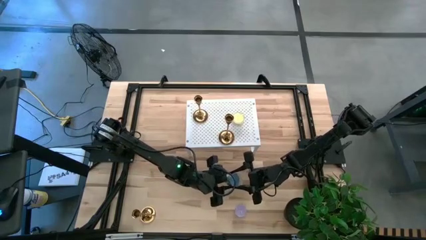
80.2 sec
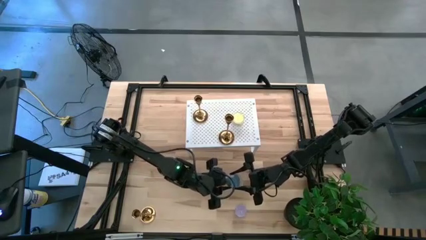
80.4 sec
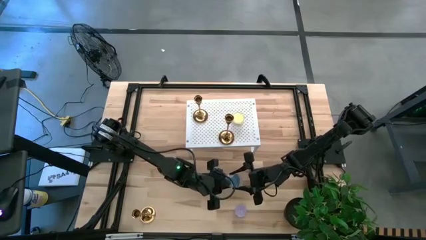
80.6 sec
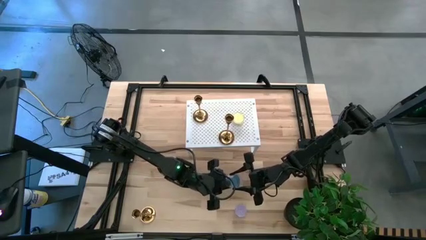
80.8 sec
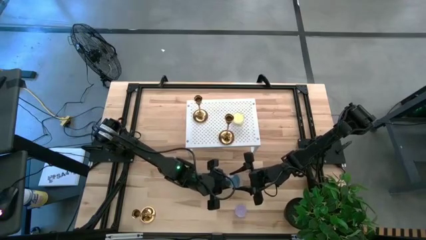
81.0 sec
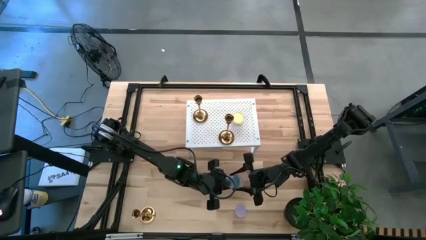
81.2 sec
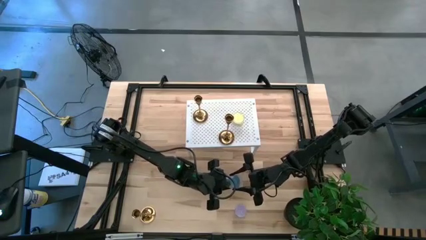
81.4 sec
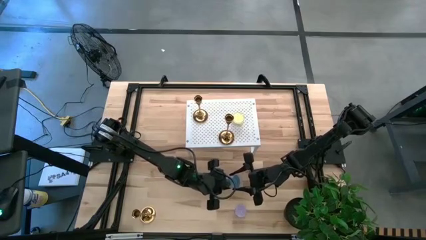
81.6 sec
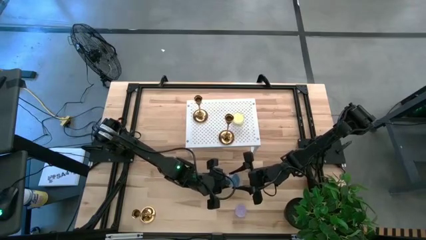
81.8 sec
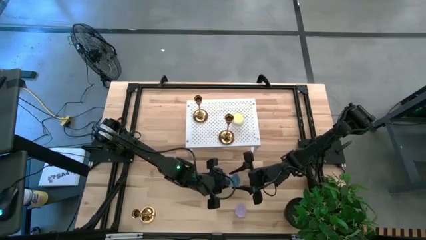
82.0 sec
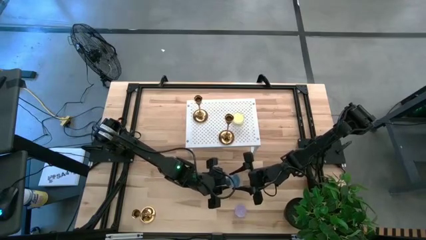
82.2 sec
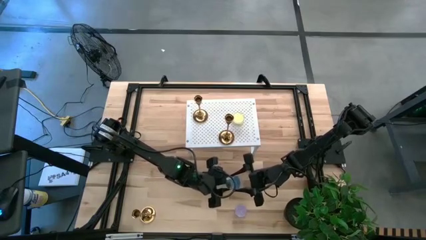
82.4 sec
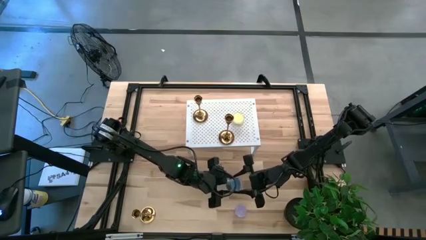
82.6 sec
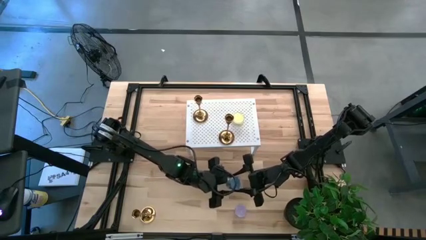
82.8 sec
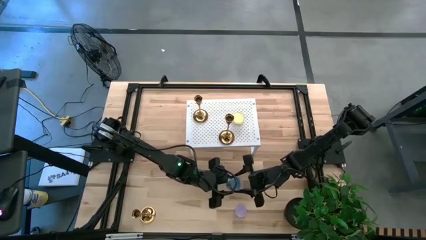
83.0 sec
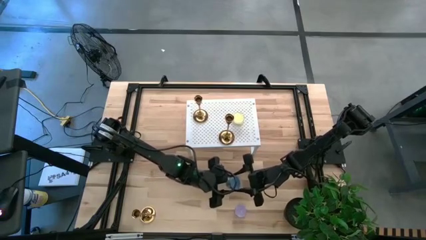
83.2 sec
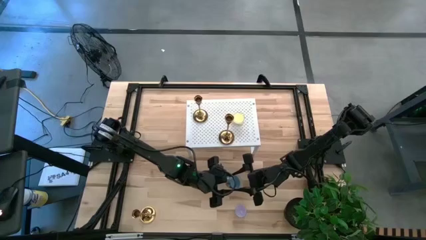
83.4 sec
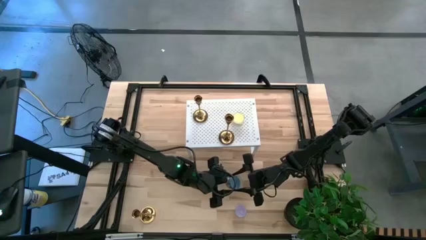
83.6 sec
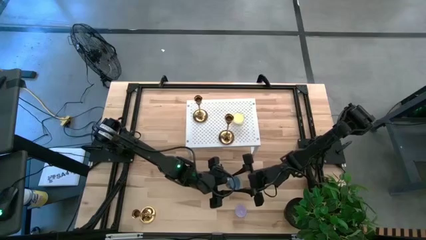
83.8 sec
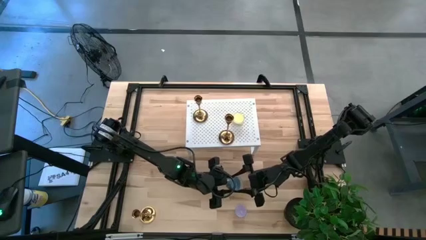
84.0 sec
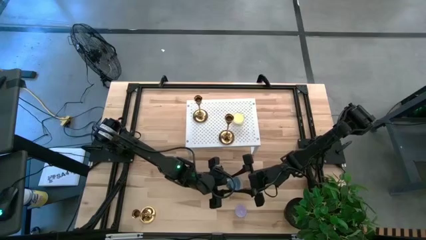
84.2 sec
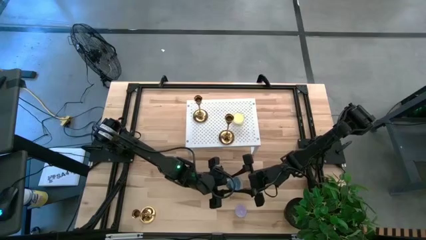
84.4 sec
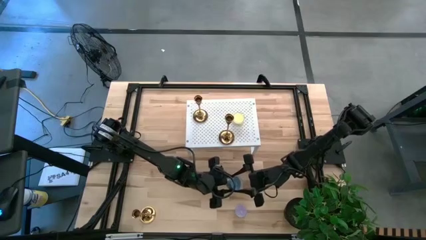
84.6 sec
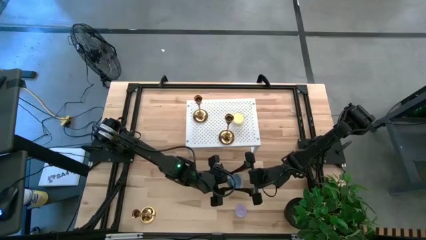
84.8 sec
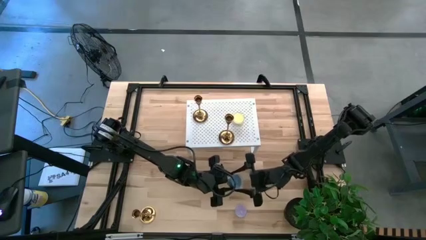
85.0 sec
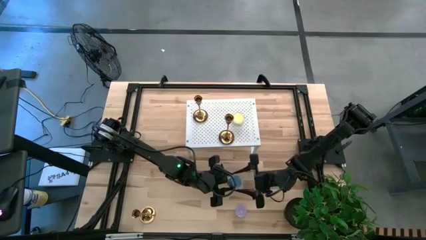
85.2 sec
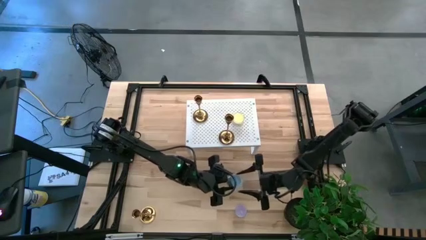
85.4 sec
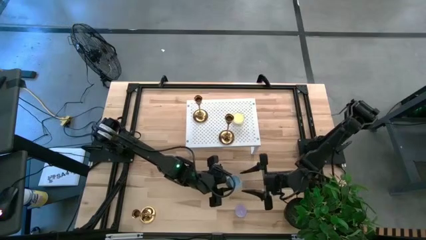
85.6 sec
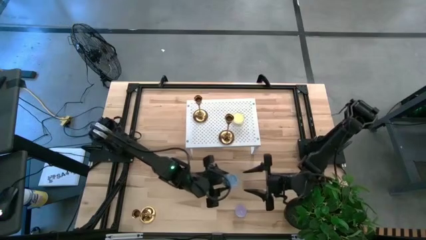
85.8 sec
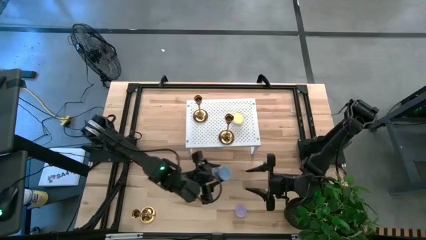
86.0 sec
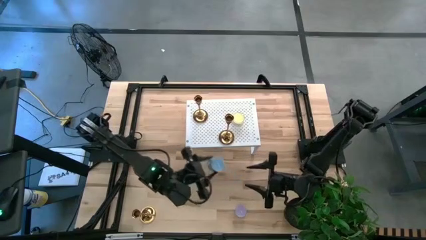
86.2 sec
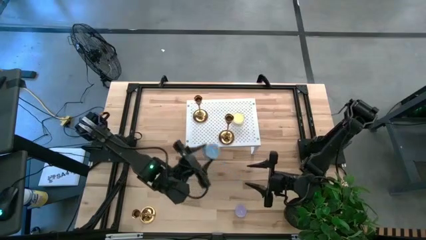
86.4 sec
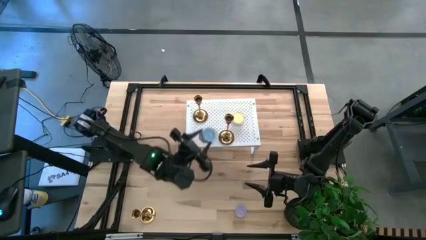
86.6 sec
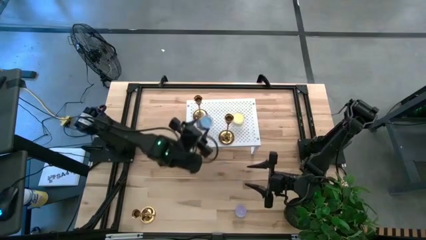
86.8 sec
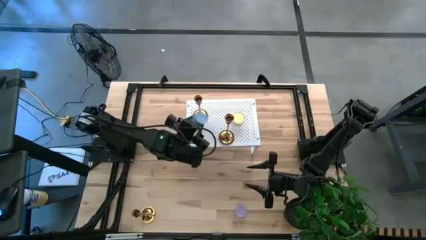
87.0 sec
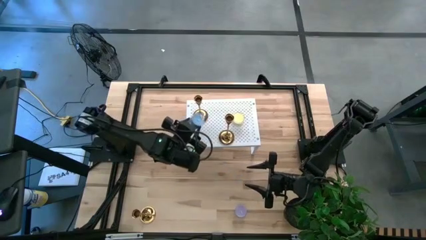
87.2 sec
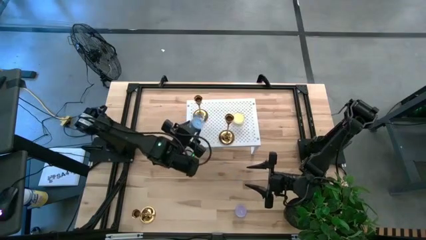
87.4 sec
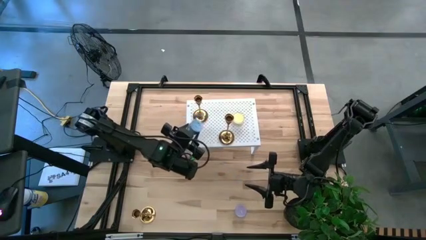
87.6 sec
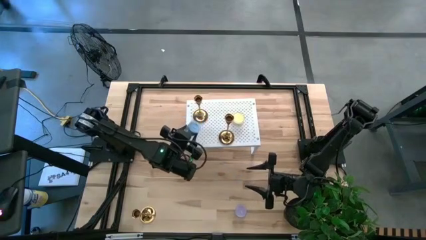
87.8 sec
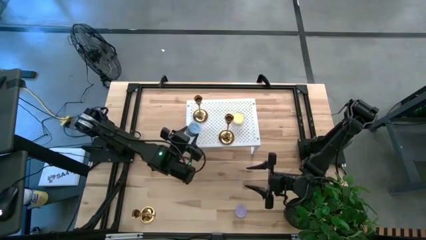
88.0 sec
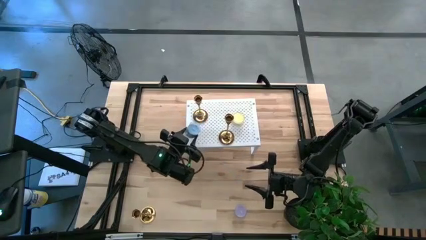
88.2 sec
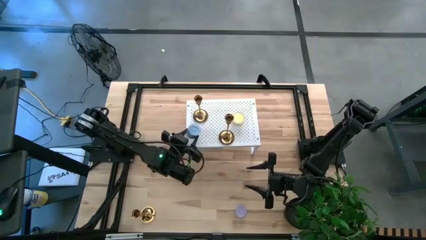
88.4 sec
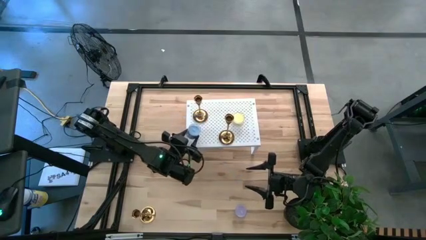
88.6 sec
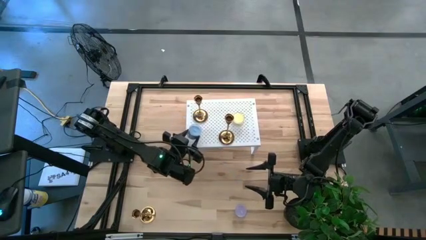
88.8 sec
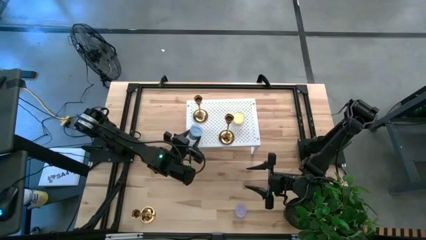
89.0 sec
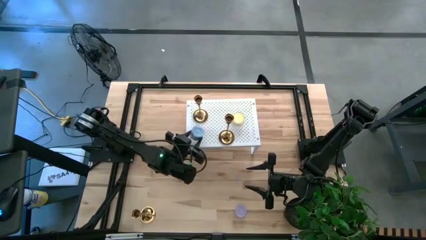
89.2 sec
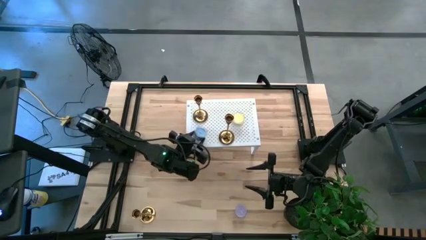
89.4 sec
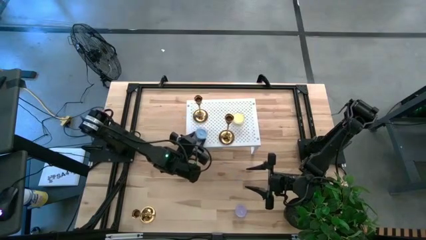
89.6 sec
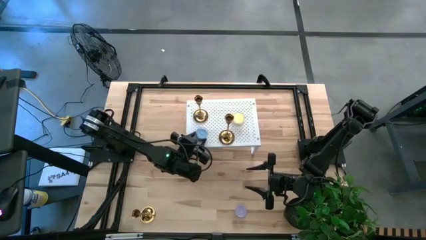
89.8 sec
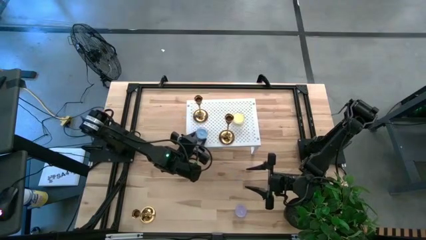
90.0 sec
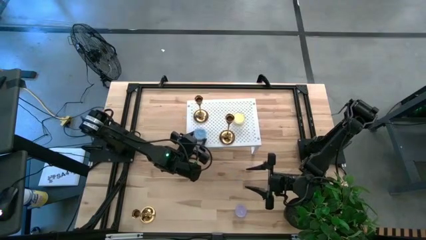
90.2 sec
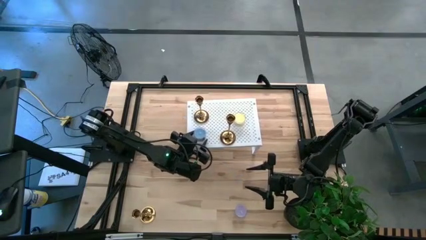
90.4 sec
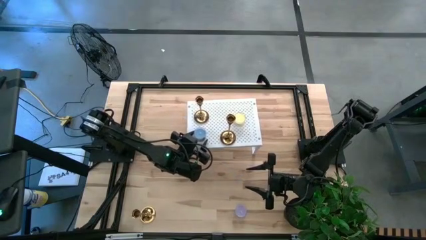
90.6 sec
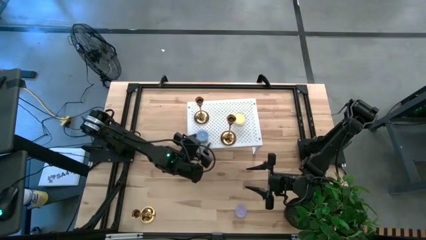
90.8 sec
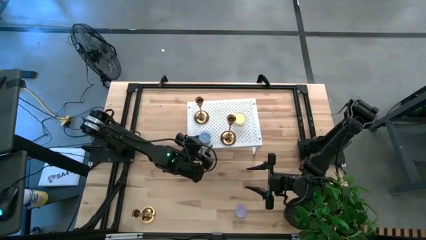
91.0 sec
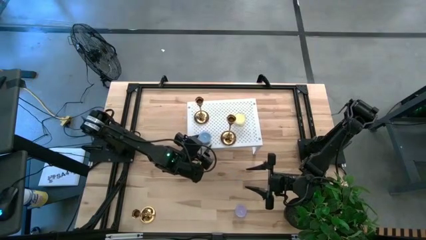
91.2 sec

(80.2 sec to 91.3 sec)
Task: Pick & Place candle stick holders
Put the blue scented candle on the shelf

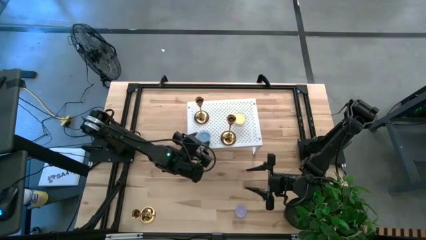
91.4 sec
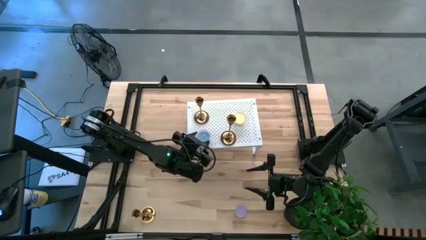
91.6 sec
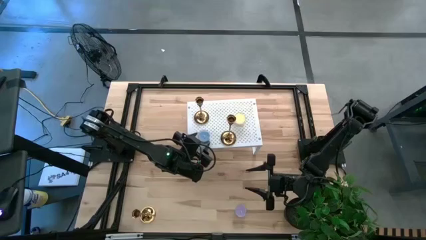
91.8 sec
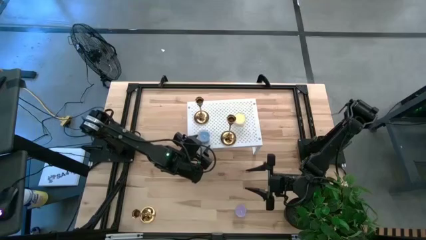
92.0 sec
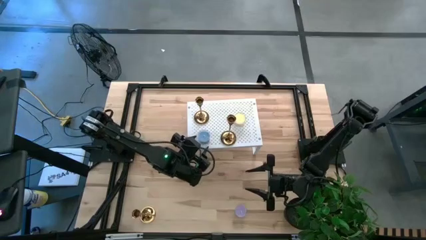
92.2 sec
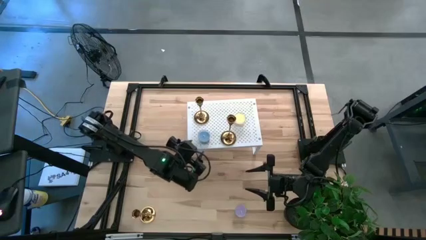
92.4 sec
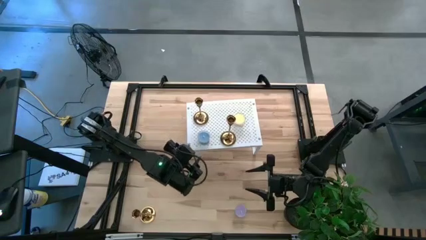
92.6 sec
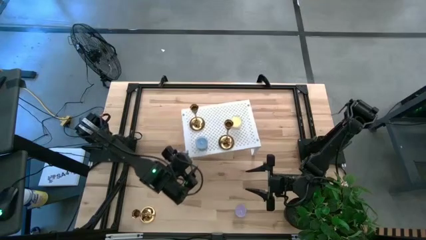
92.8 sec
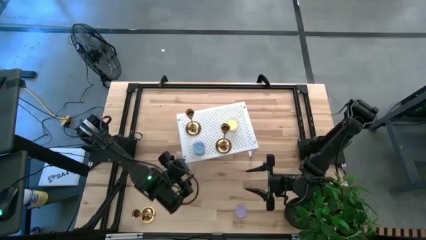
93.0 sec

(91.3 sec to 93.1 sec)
Adjust the shelf on the table
